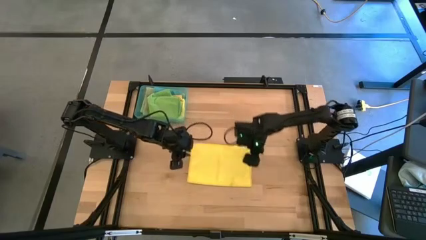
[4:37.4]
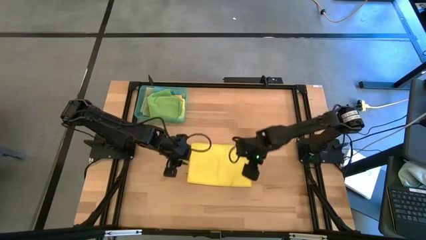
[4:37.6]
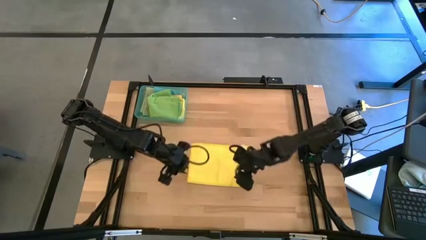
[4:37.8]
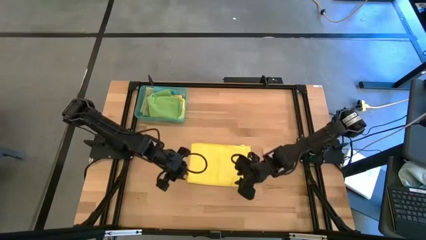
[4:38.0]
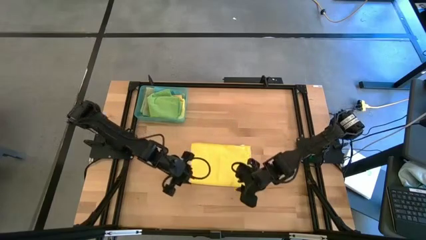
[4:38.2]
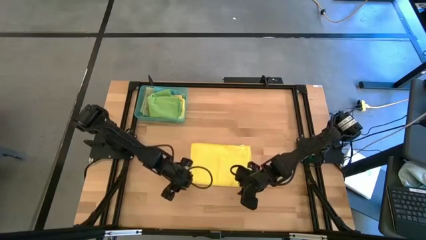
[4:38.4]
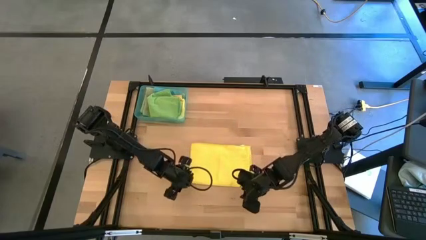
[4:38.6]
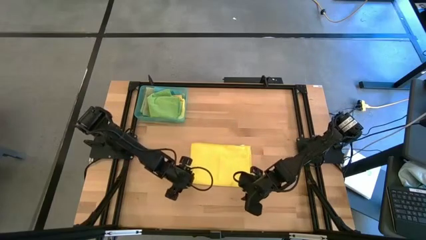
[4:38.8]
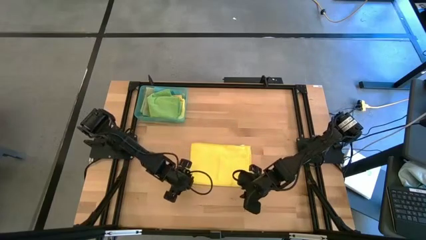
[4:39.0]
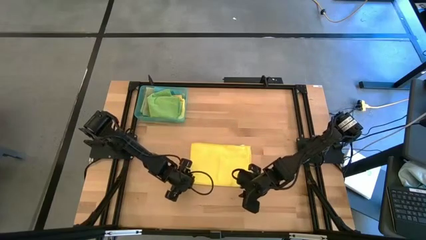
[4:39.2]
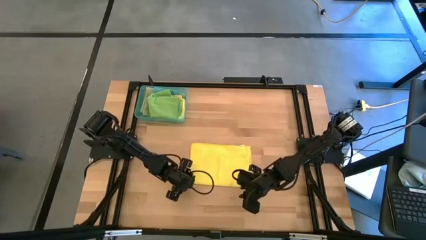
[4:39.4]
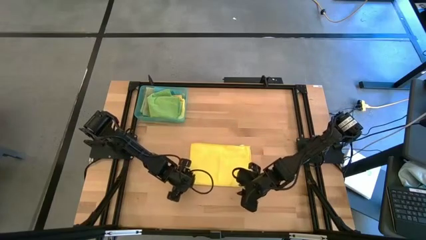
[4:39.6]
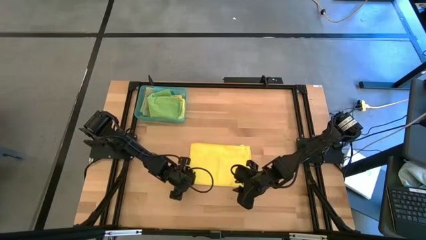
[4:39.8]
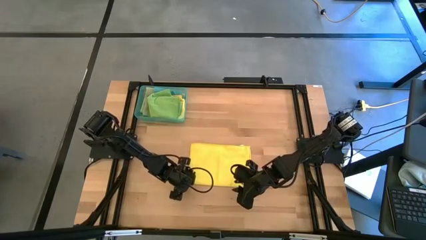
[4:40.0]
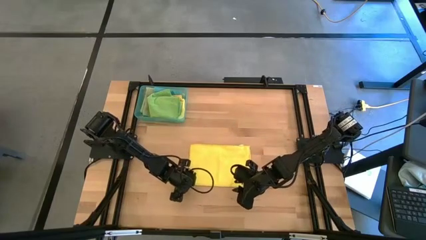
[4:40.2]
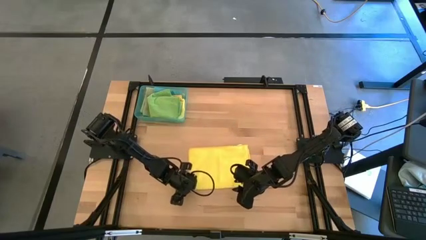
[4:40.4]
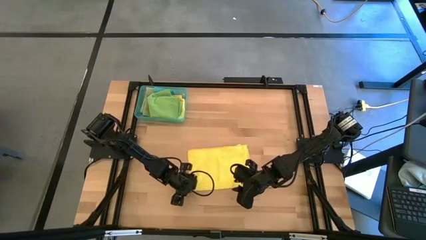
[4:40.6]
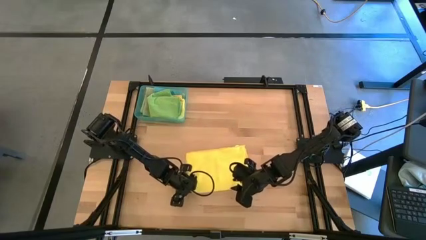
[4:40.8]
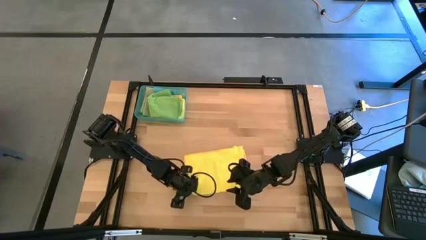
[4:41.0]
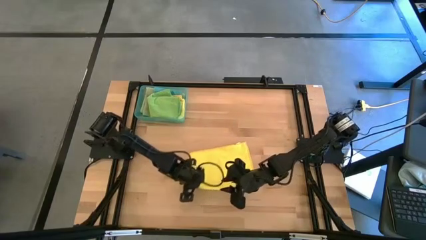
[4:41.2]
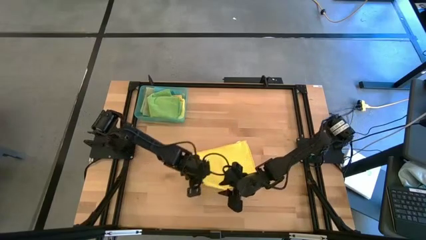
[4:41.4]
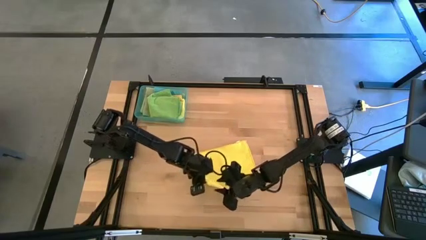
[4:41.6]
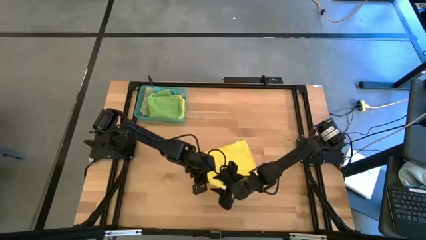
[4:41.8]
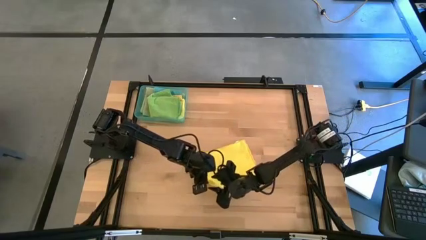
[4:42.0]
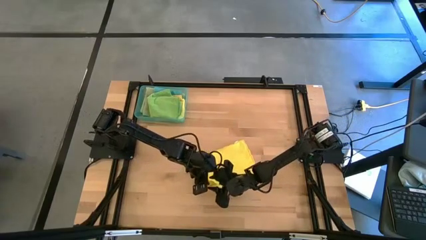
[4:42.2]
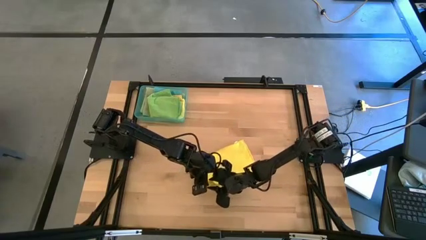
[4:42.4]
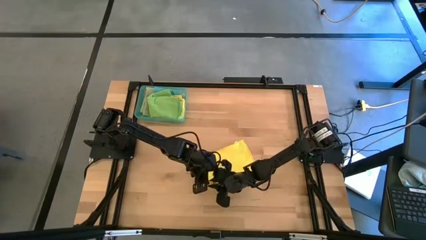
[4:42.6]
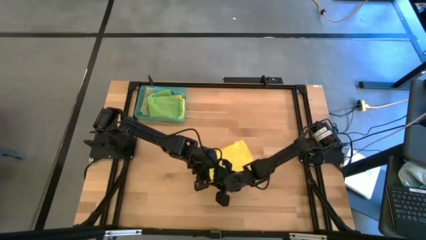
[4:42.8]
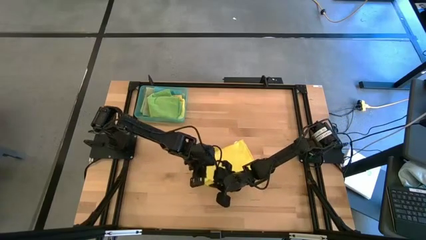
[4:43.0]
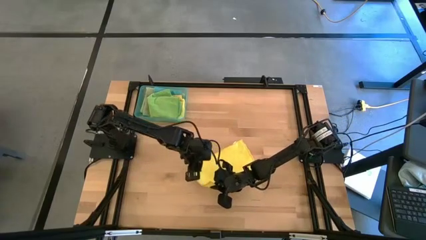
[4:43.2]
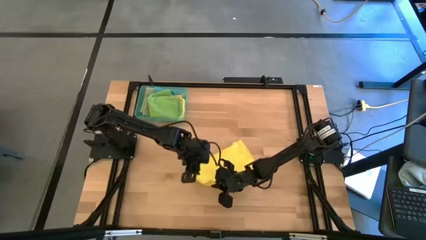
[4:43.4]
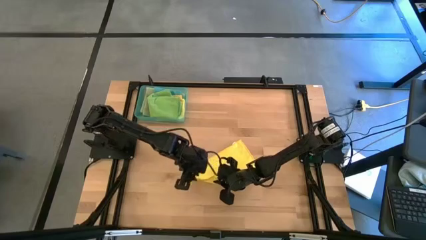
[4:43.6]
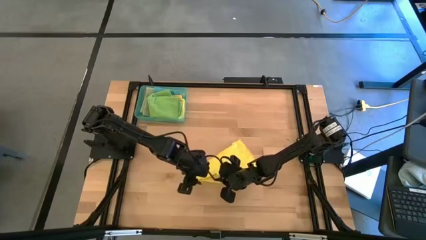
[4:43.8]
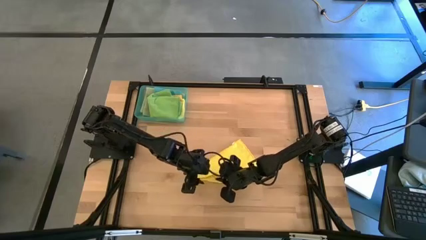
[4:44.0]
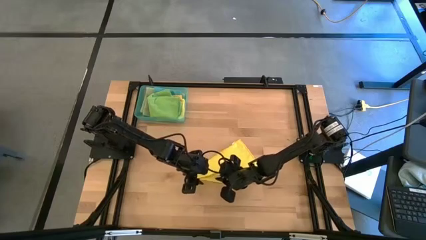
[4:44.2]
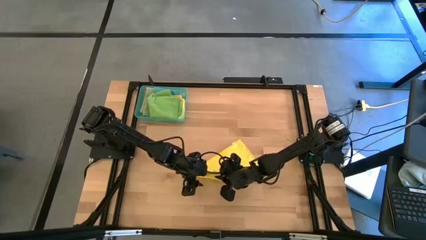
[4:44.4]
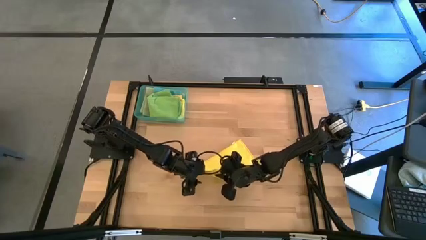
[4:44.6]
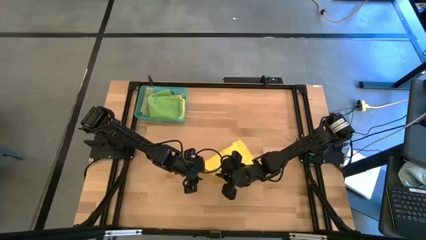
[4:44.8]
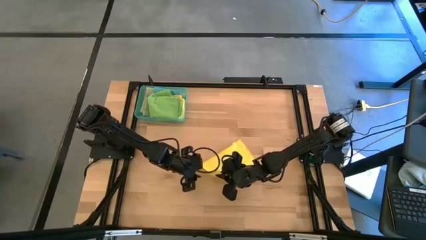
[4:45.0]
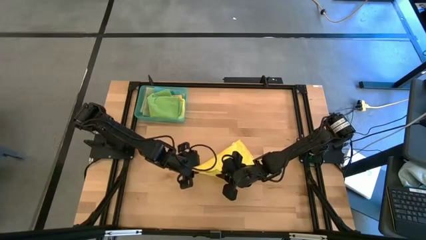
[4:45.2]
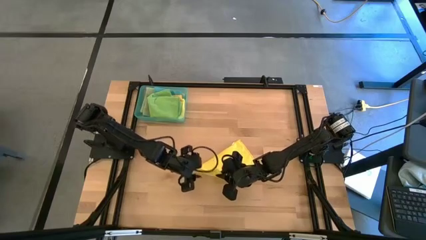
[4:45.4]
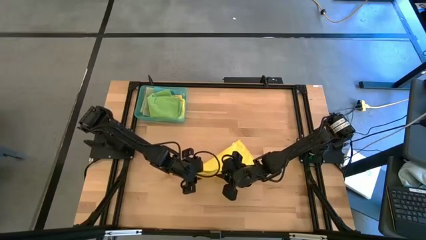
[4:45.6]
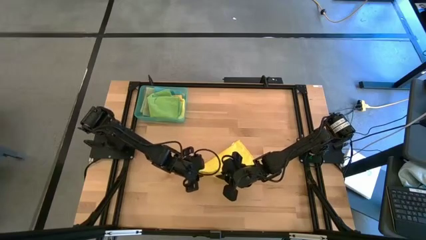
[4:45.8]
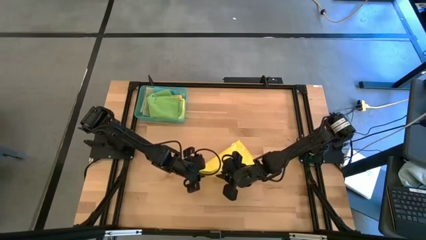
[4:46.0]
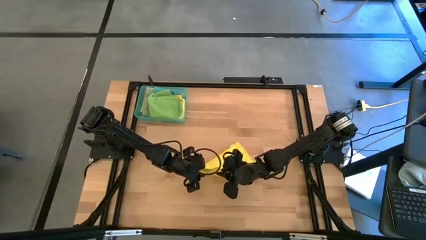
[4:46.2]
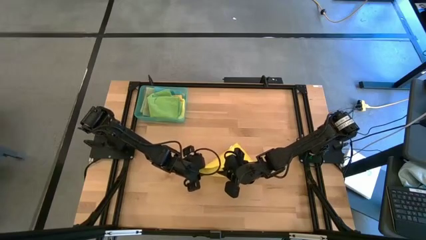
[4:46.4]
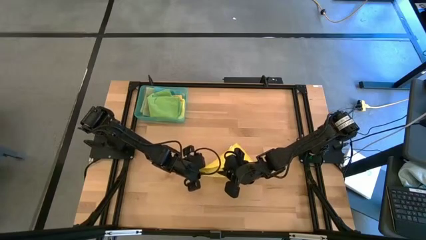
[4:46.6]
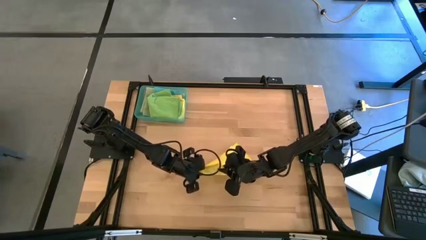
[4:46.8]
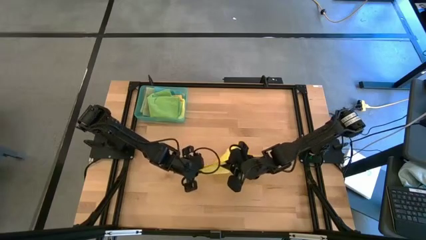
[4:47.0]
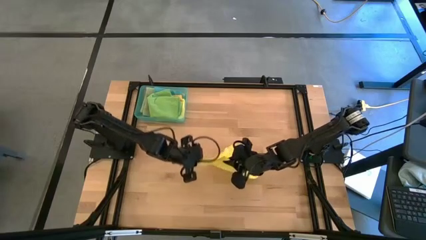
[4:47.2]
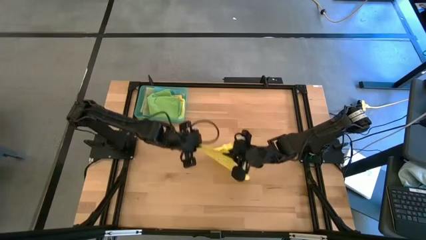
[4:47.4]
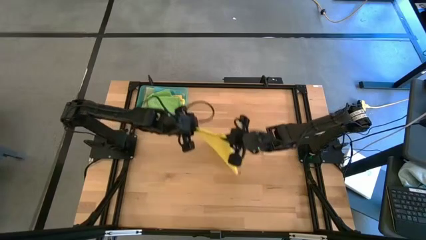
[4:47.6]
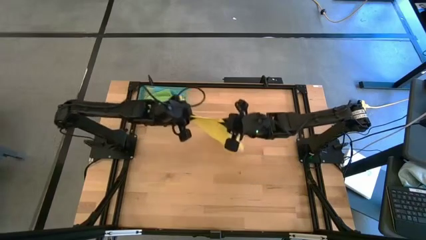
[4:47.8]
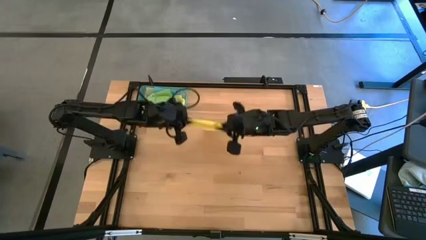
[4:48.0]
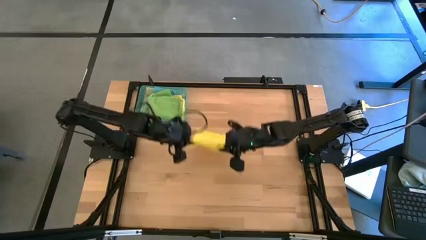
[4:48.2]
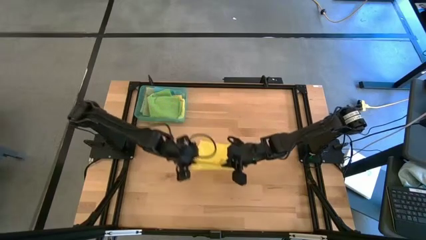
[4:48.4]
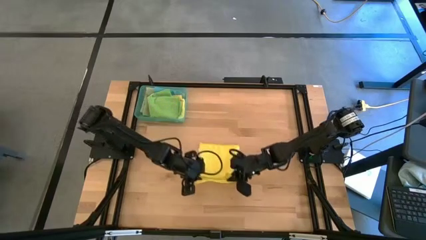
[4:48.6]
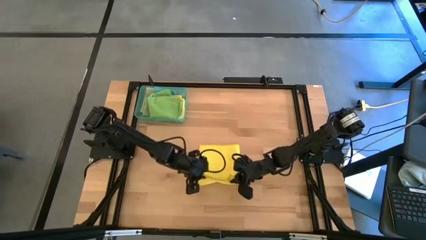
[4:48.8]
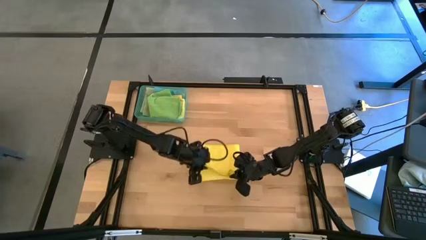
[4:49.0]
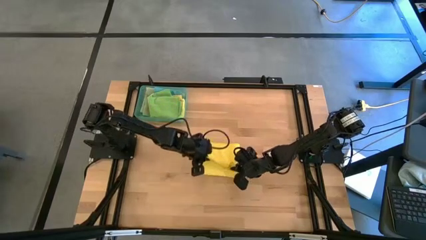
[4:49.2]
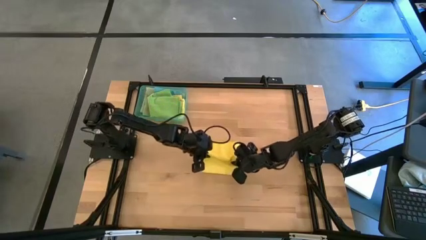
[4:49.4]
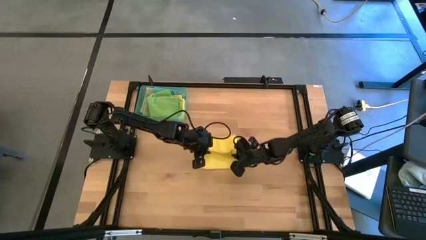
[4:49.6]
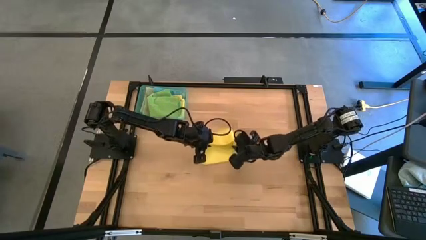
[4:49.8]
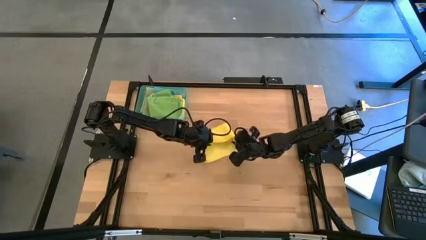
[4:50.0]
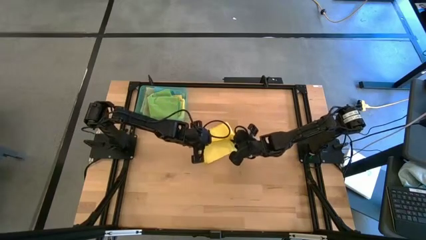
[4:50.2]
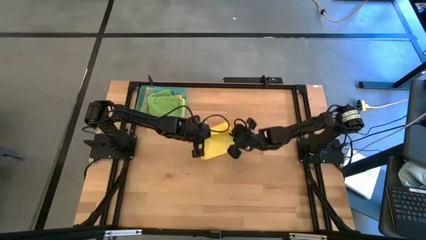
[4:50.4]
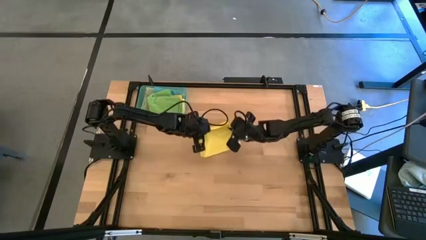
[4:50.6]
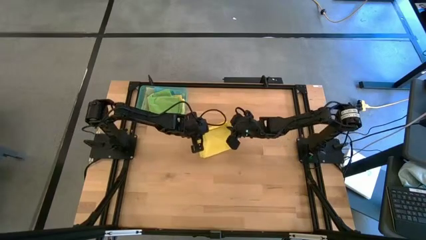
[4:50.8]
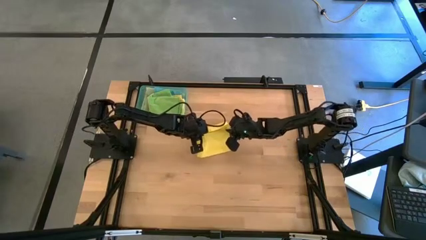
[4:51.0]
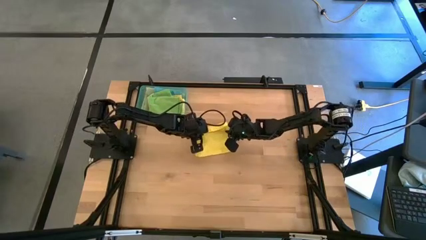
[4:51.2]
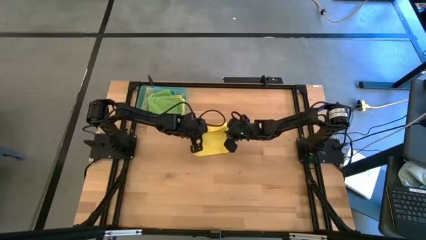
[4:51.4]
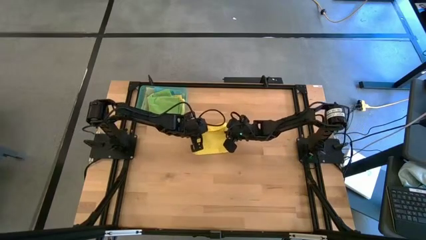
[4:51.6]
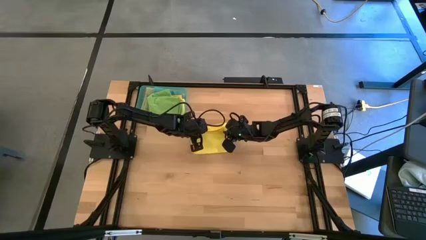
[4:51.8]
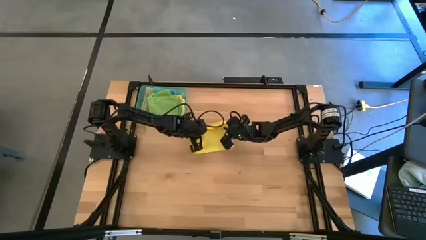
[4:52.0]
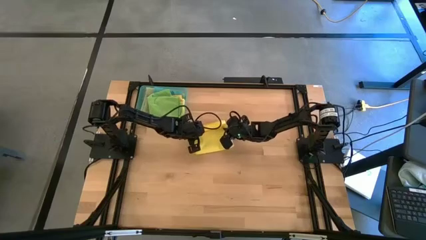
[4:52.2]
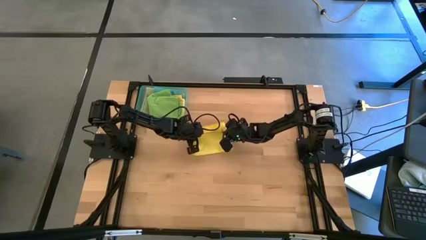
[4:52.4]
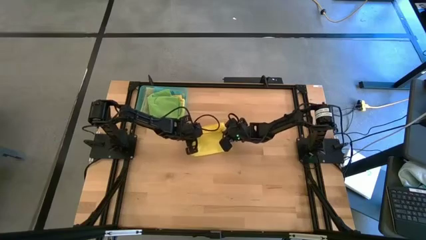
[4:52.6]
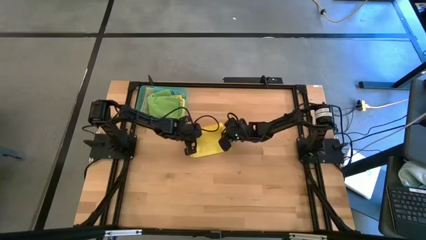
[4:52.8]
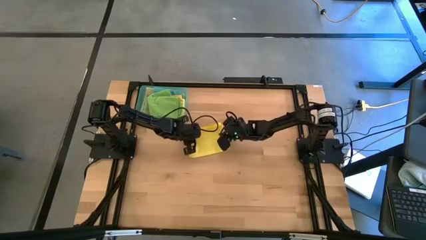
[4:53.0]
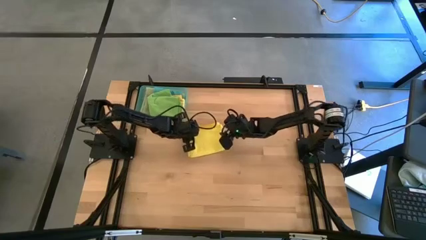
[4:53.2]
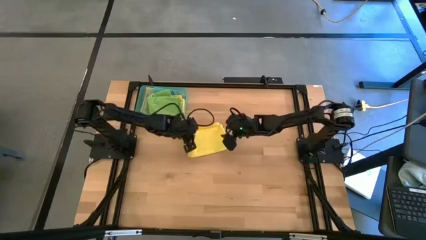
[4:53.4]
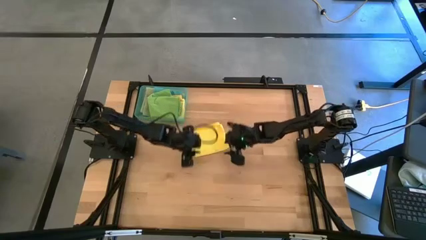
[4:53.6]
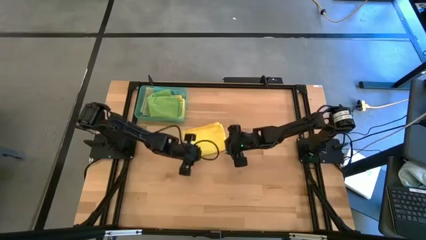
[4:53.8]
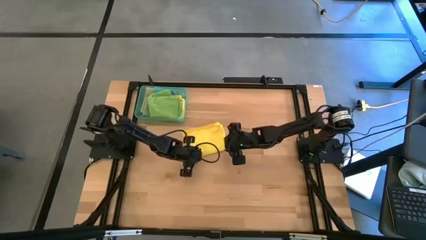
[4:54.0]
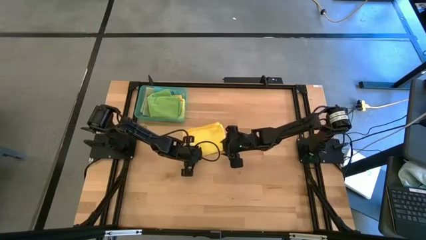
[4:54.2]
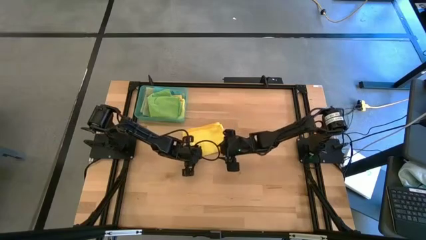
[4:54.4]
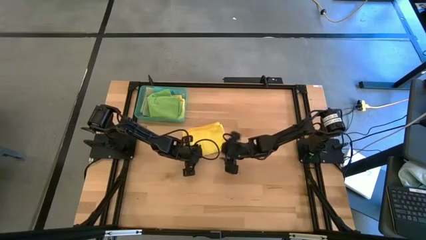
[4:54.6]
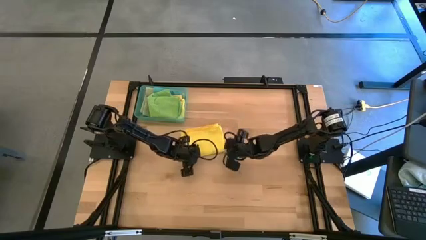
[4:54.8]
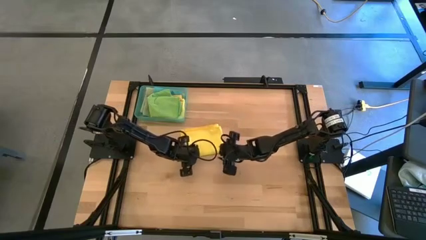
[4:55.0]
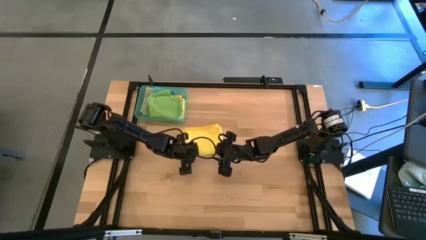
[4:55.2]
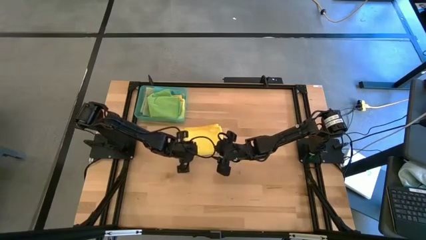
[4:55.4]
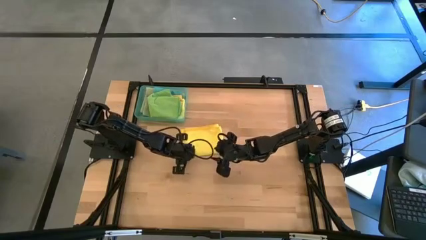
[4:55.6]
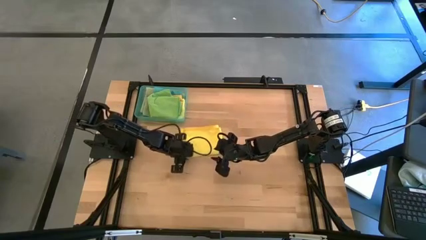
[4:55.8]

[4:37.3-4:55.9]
Task: Fold microfiber towels
Fold the yellow microfiber cloth
